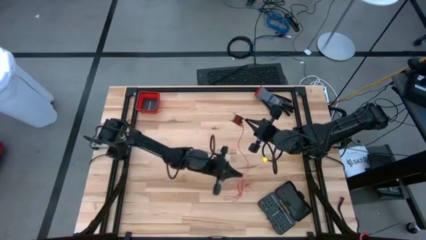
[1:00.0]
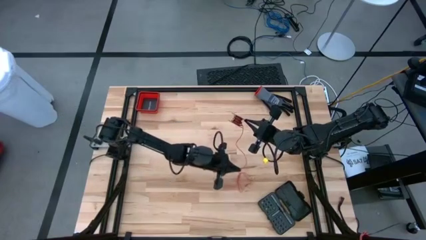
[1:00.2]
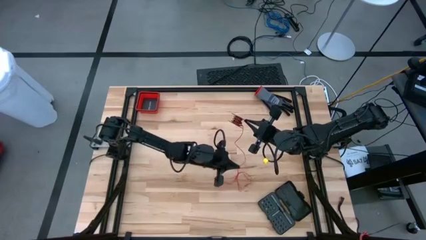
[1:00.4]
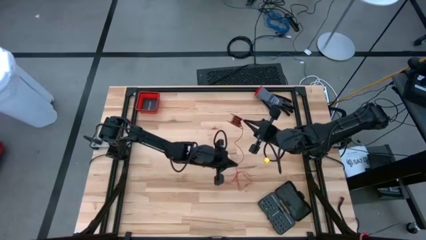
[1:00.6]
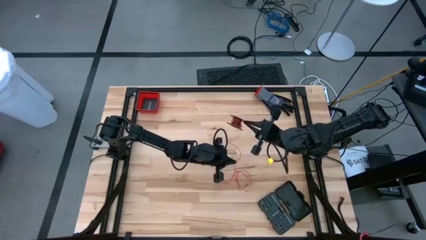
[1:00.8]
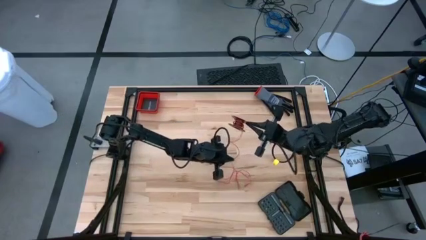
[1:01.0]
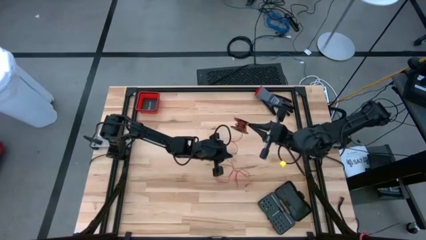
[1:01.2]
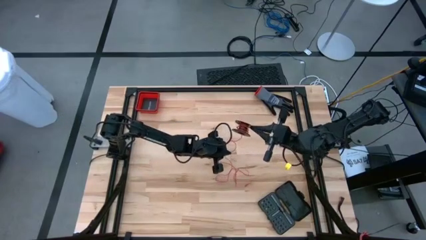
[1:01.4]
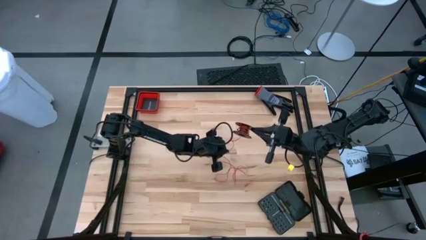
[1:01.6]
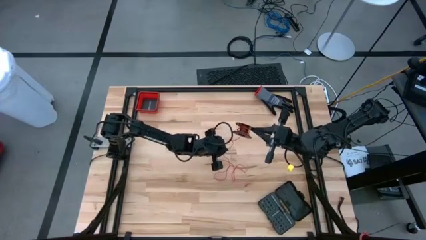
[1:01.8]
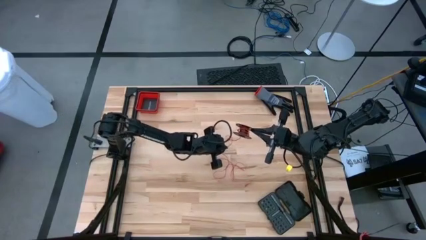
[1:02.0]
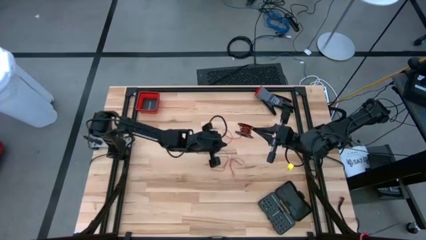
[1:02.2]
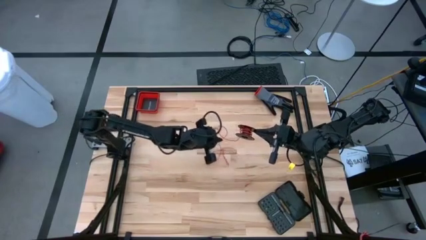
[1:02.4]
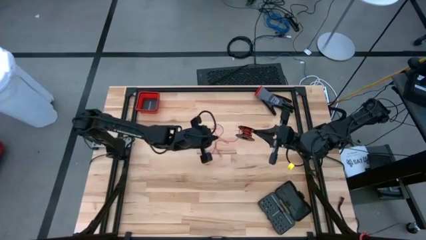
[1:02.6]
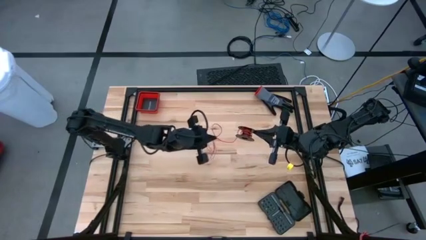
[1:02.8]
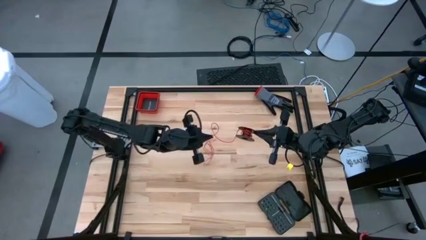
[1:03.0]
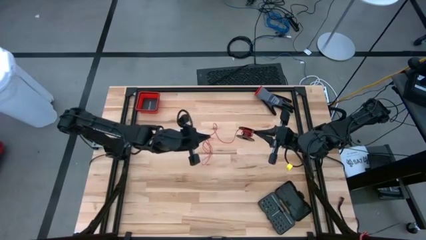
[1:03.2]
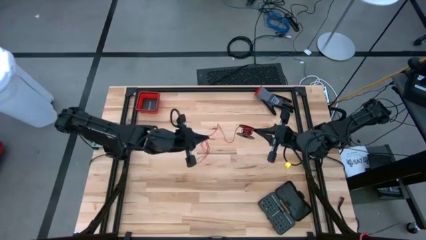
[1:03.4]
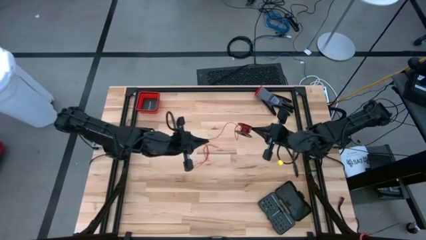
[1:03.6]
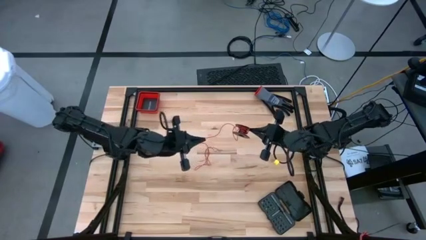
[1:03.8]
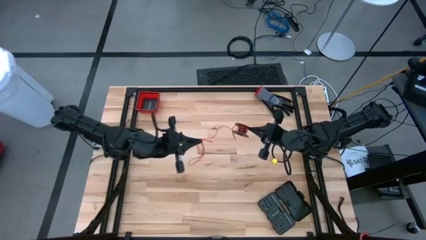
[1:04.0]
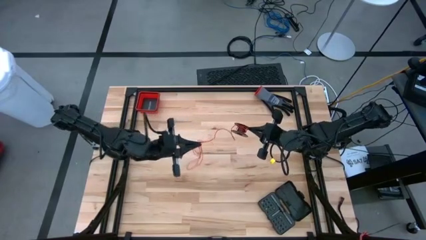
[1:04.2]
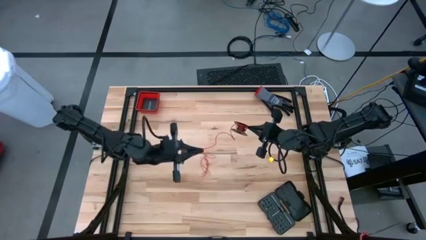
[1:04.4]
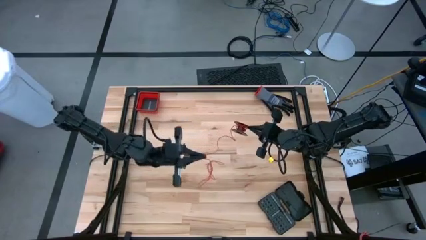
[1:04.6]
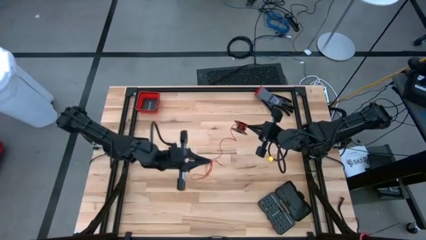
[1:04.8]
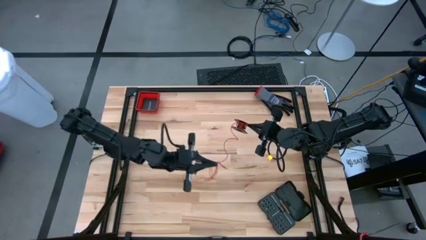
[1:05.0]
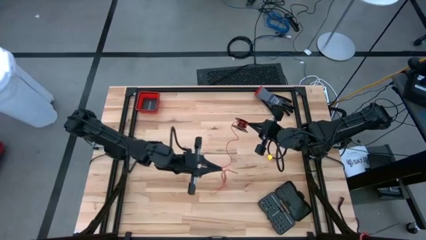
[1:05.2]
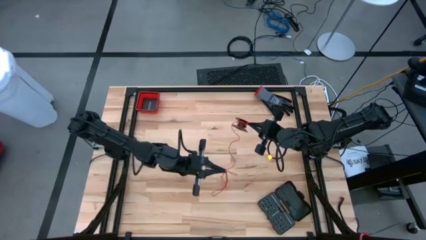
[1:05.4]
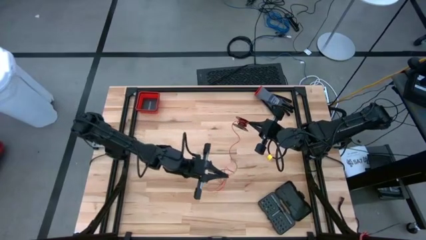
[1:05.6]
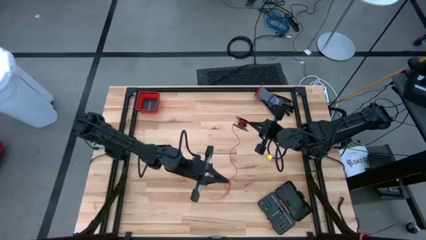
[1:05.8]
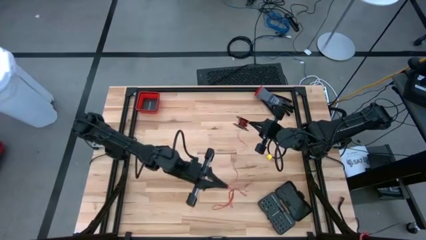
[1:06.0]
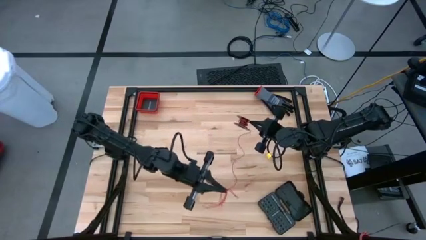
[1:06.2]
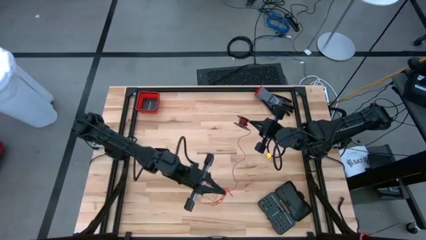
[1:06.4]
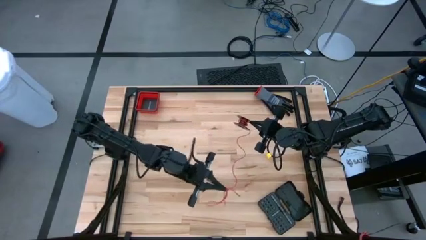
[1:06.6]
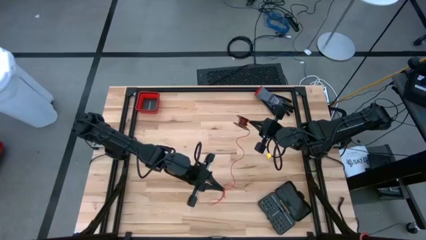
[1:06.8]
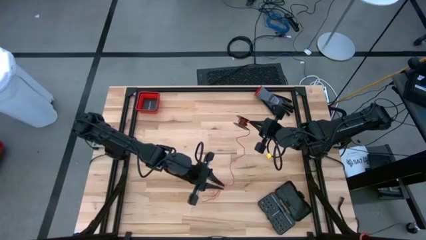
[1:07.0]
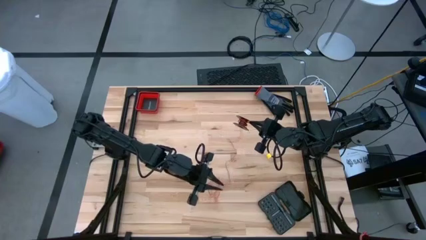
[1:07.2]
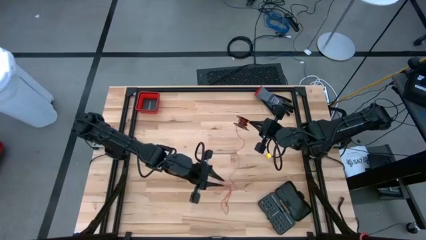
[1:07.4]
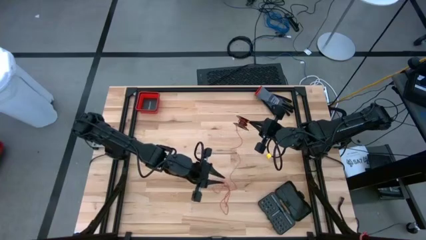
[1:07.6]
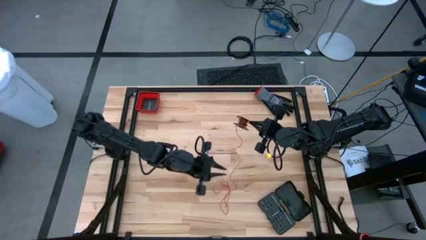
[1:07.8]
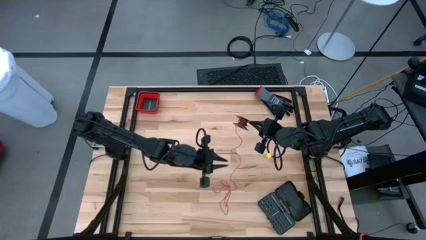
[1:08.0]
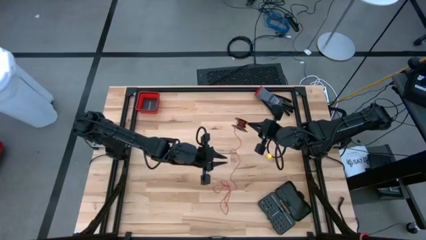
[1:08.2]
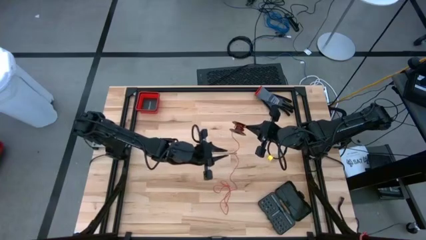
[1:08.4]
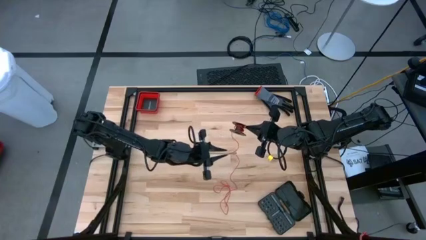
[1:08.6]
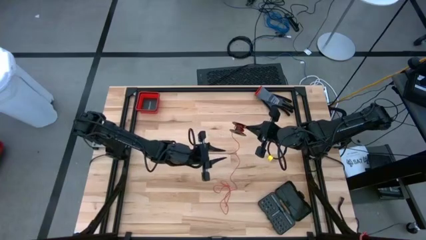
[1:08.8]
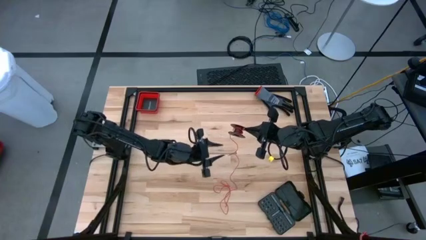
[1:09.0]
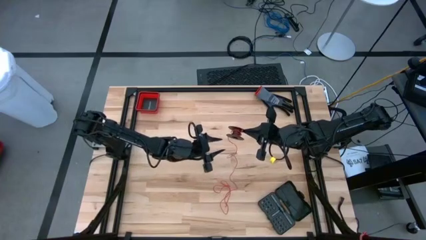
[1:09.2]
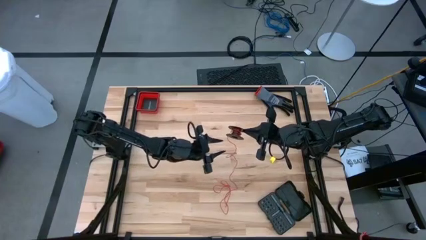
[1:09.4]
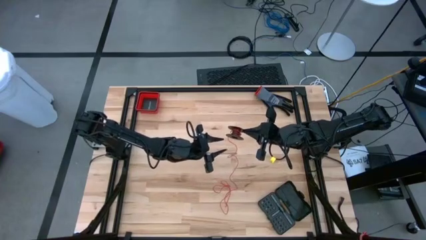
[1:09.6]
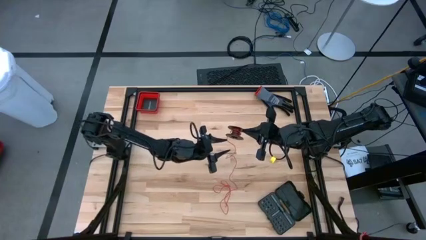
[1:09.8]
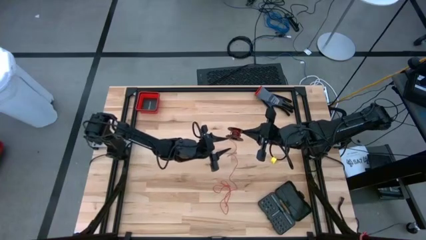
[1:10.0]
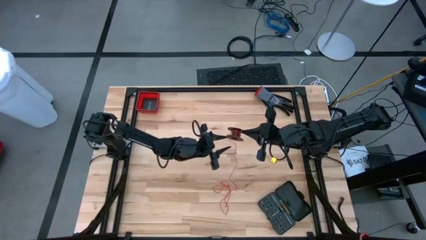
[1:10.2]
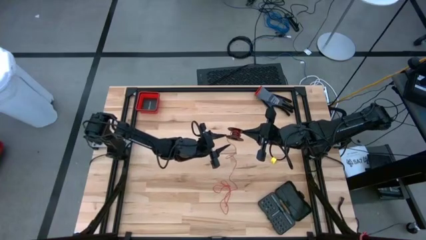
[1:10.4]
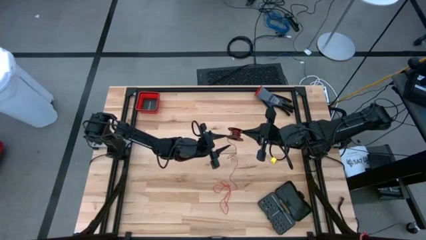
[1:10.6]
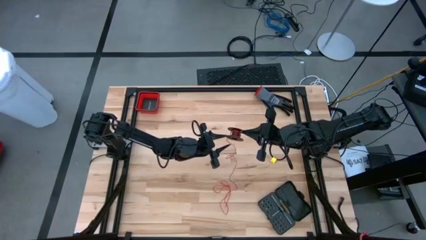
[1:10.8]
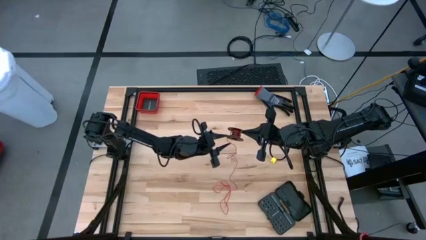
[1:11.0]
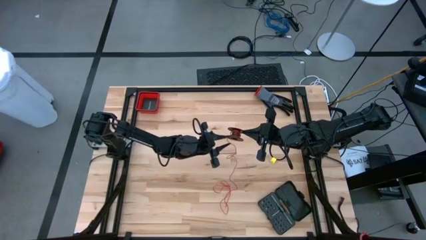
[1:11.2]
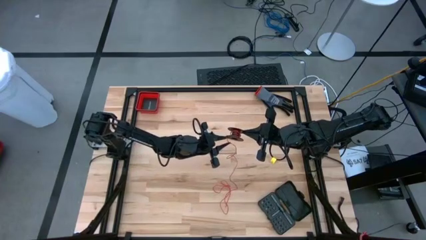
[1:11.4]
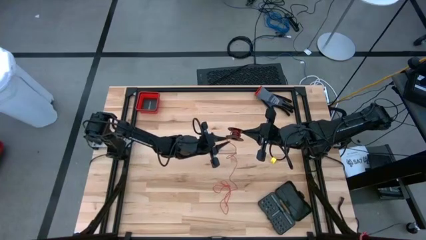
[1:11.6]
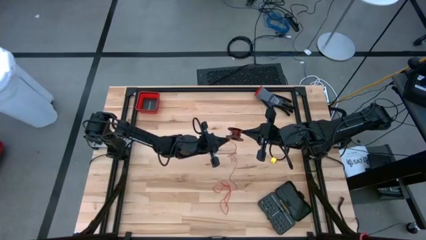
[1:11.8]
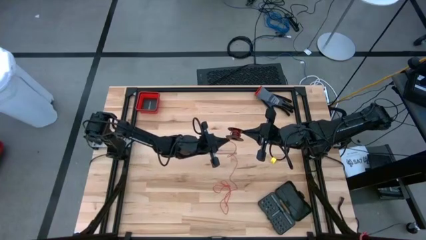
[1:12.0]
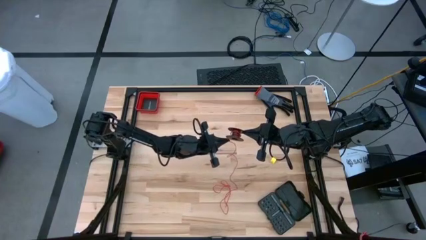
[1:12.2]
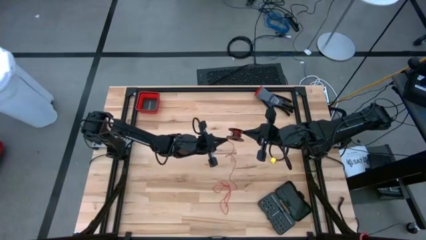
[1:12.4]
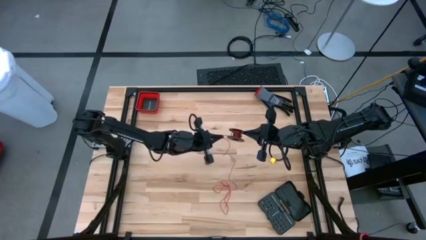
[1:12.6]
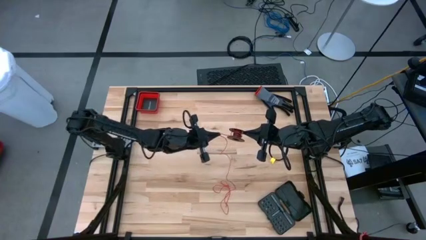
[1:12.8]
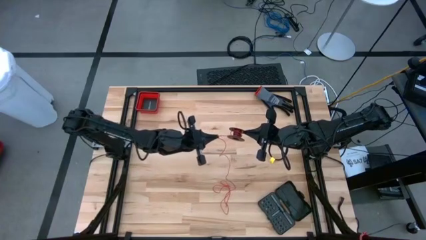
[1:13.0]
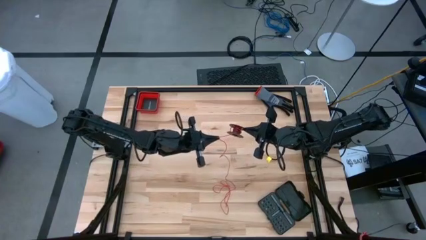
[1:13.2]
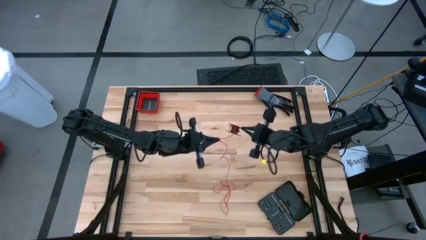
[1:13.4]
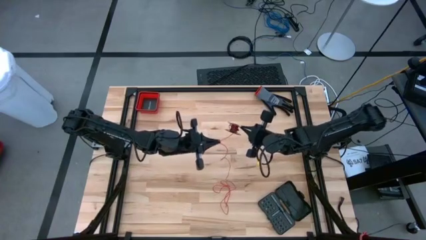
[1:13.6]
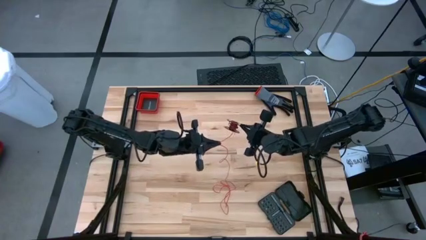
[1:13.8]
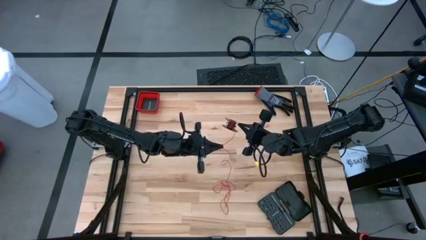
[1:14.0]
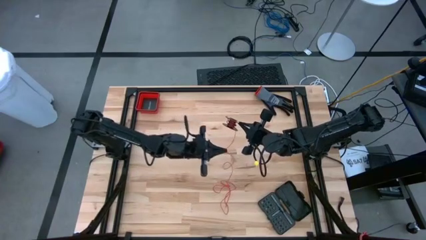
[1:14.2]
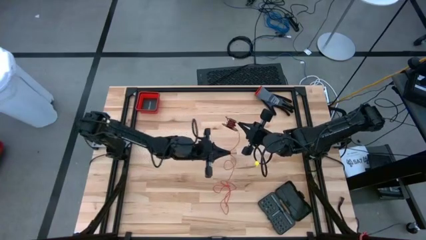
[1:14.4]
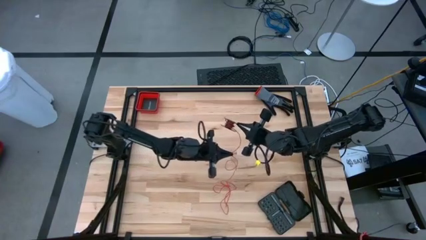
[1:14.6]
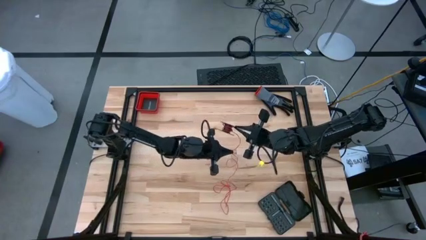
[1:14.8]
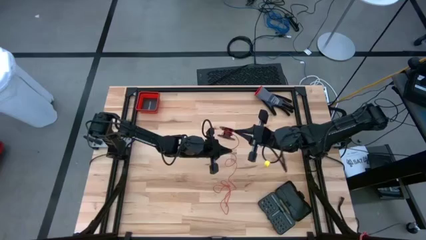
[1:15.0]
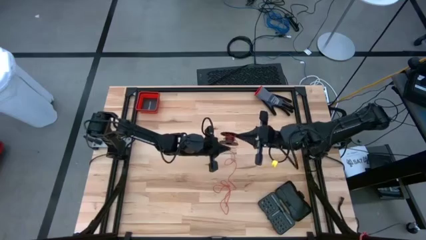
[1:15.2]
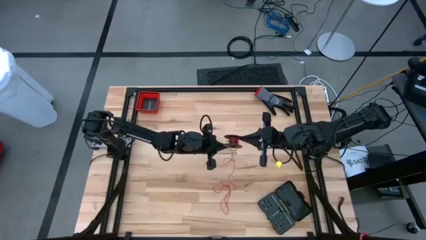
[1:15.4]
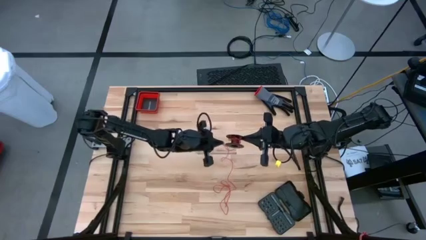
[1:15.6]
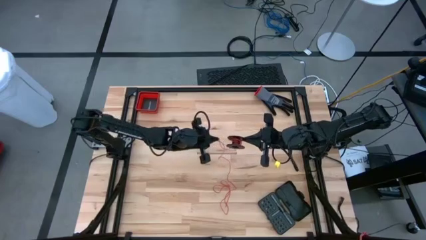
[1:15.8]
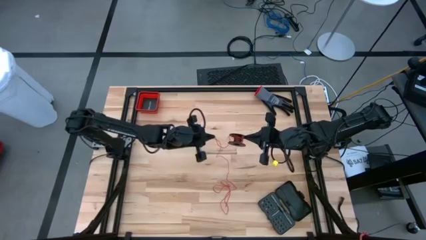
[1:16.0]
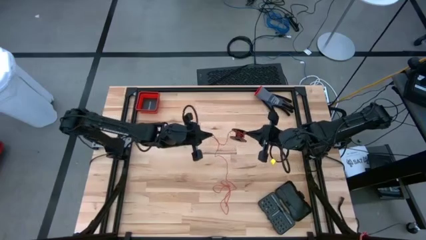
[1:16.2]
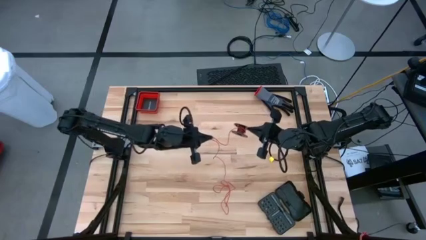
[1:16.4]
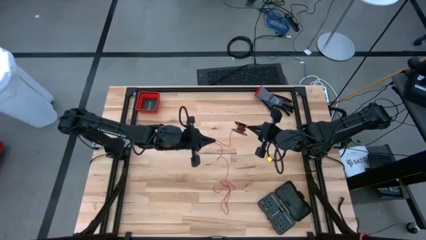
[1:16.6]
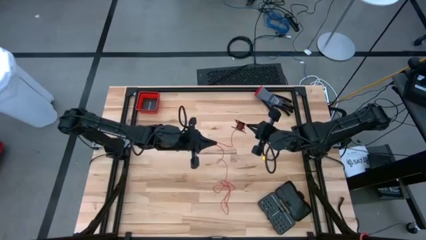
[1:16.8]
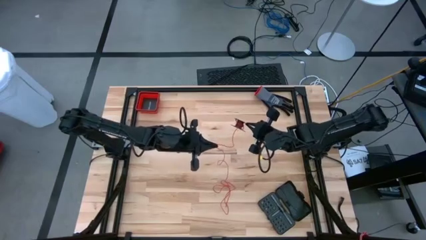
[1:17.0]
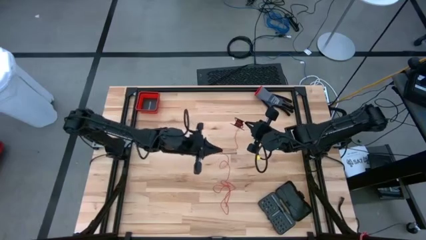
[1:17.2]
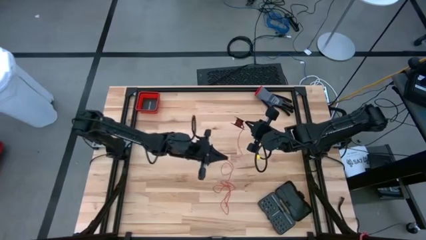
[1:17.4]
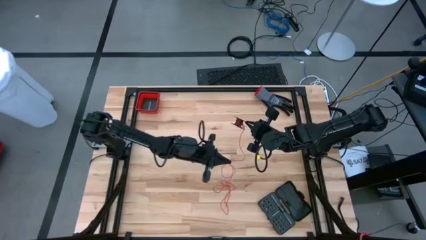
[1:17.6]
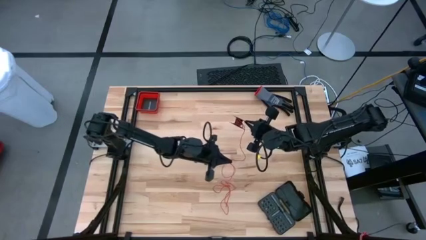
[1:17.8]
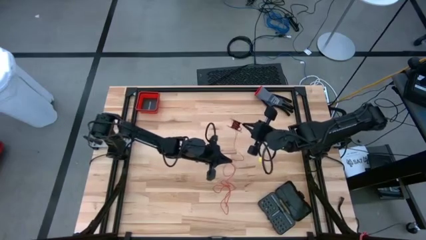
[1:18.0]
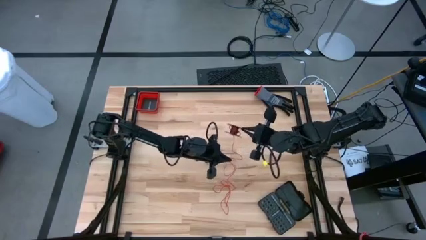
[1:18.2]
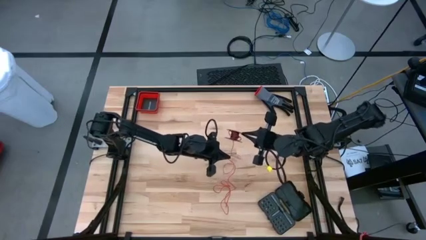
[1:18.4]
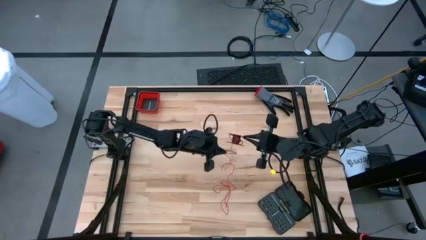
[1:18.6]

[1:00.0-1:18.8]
Task: Coil cords
Uncoil the red wire from the spool
